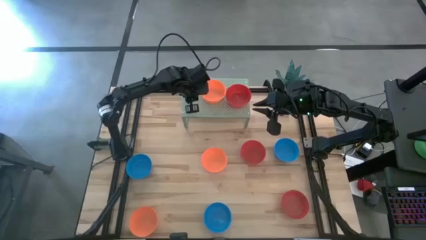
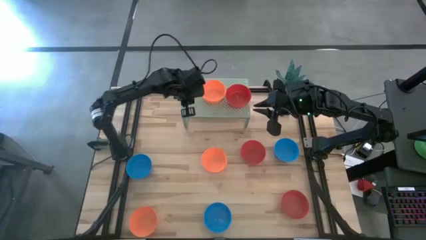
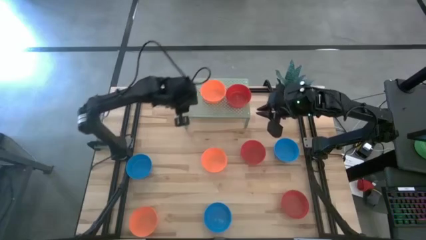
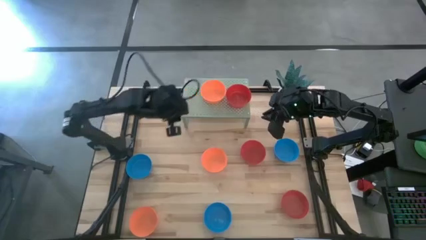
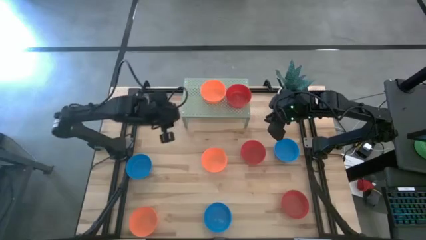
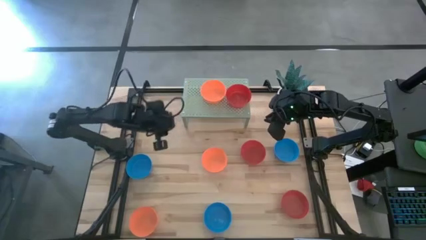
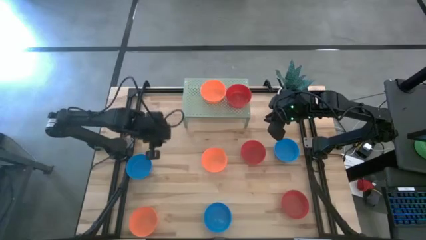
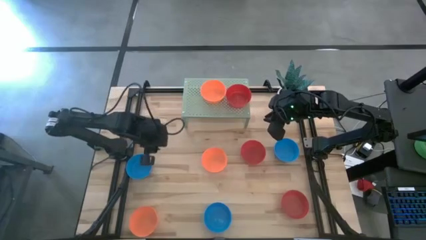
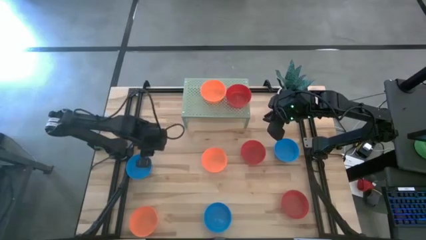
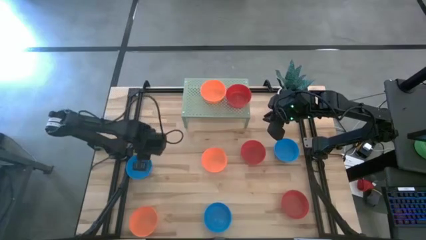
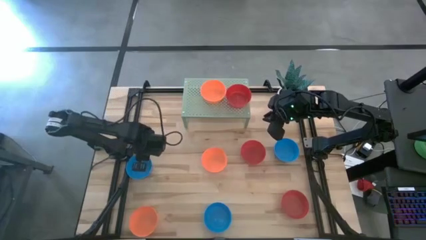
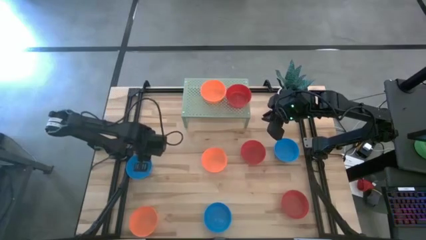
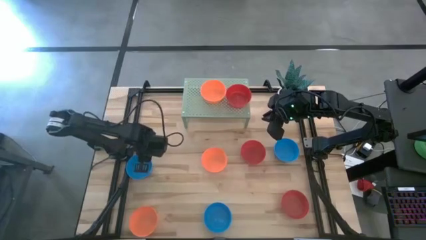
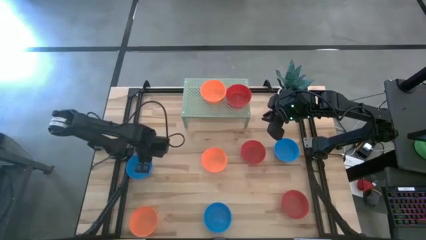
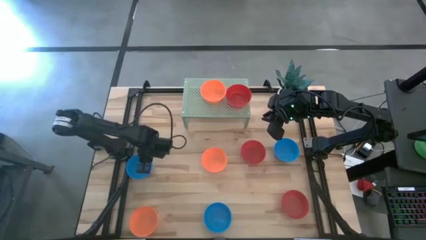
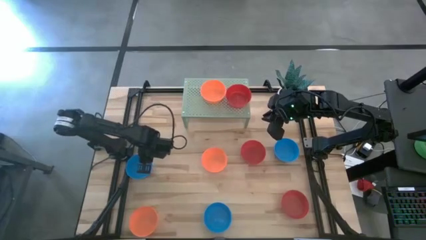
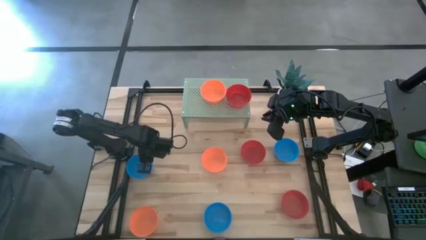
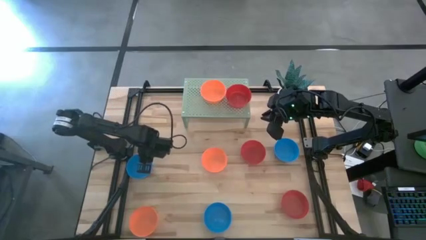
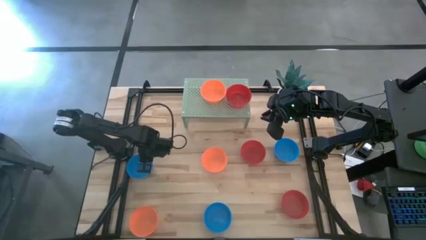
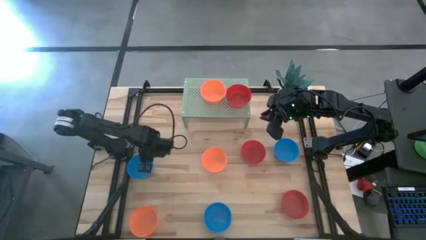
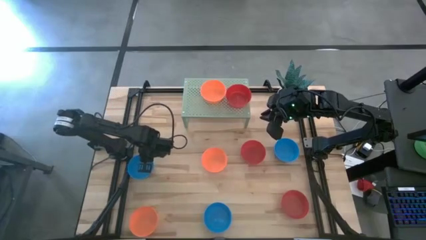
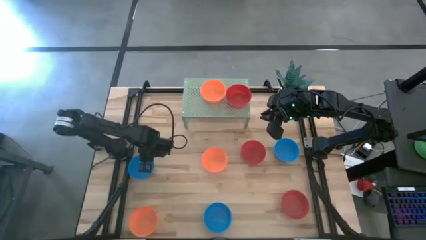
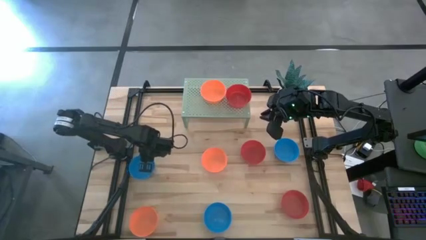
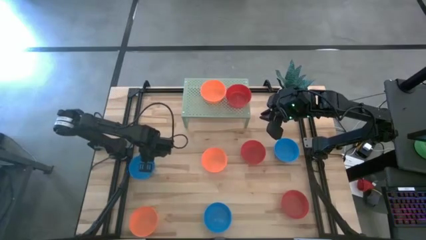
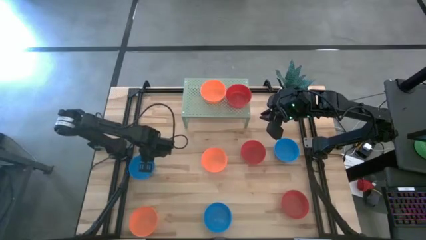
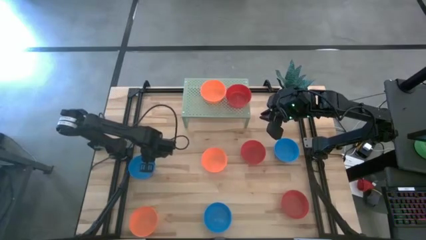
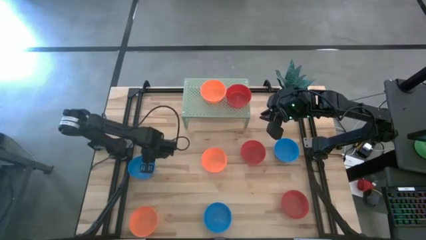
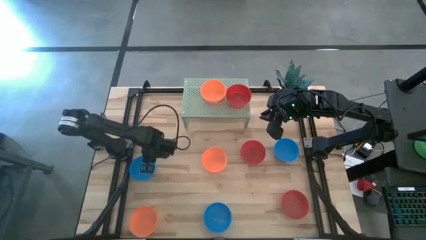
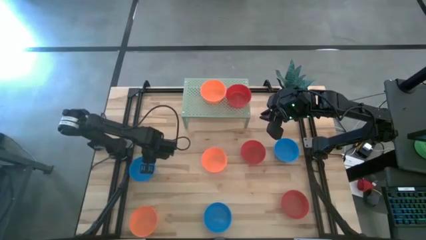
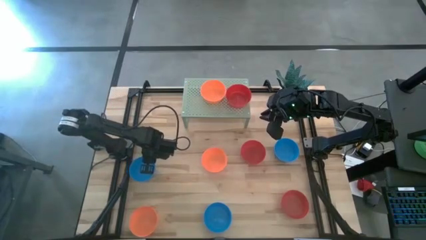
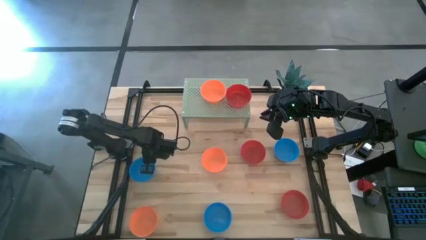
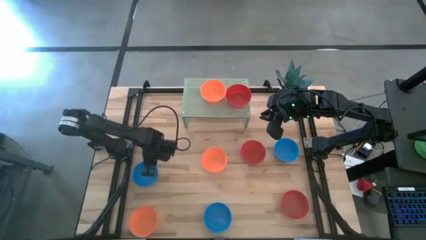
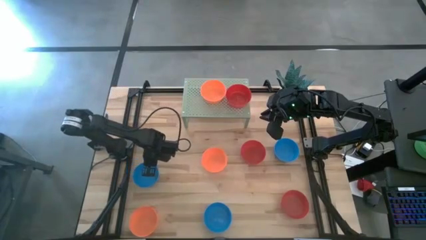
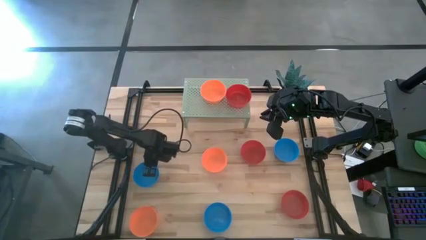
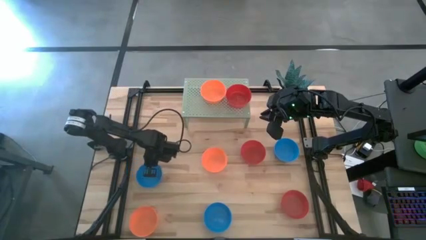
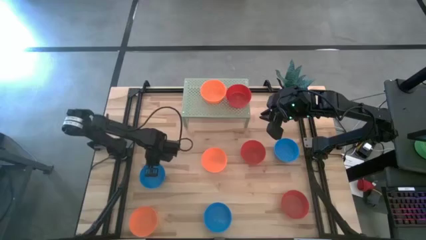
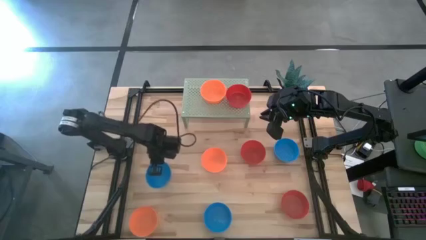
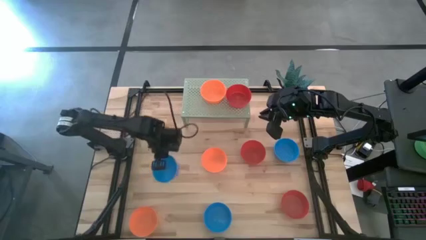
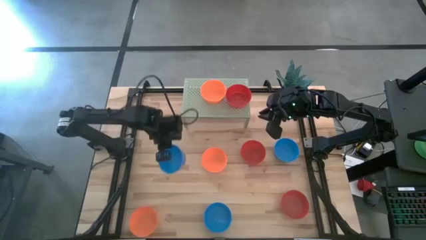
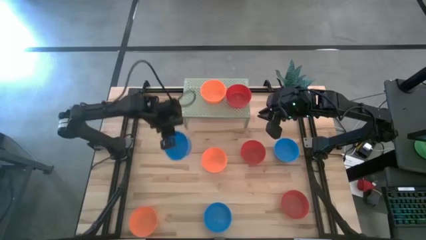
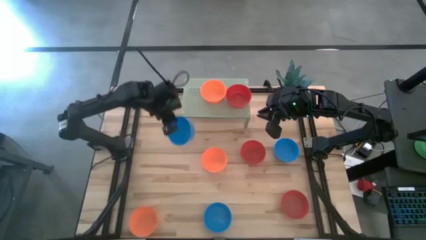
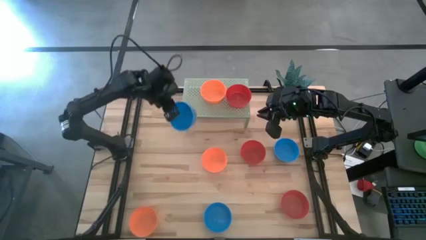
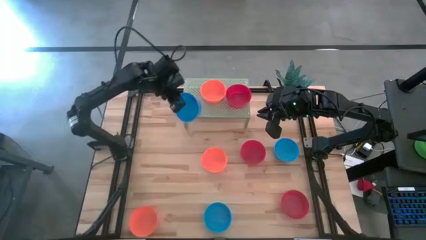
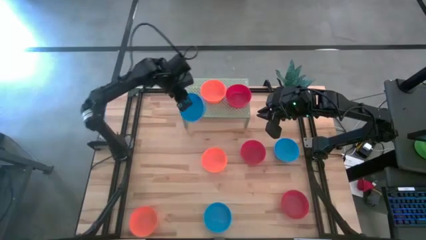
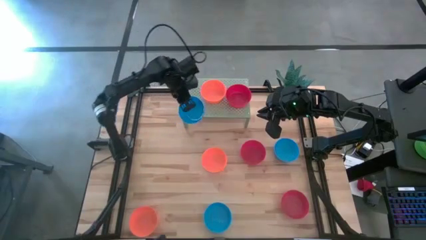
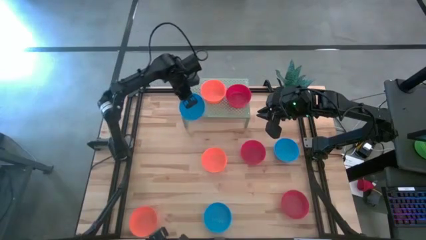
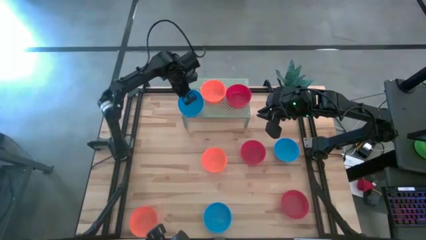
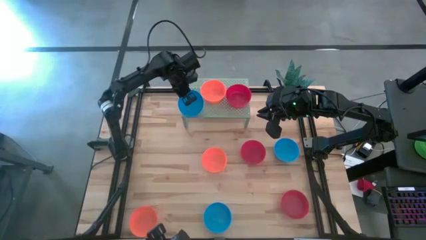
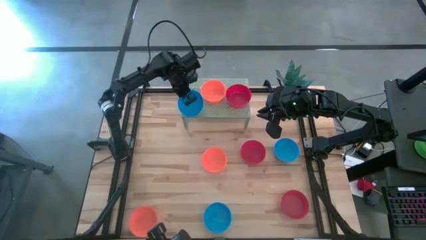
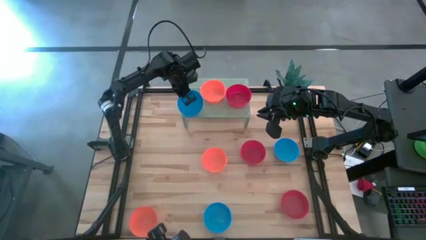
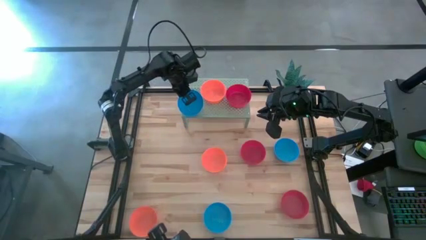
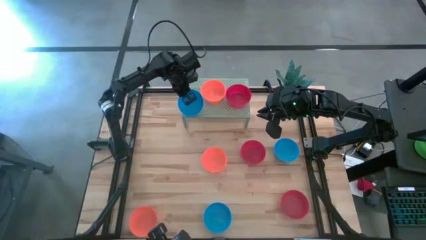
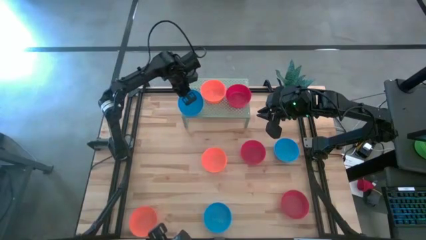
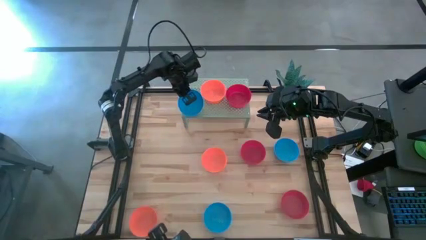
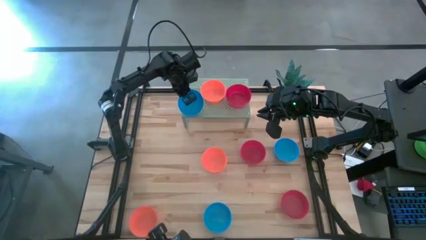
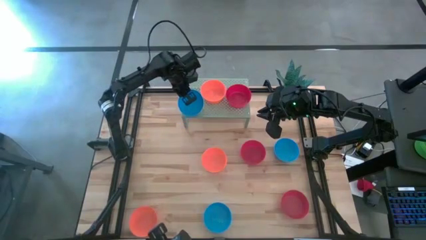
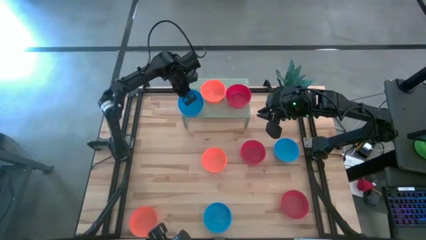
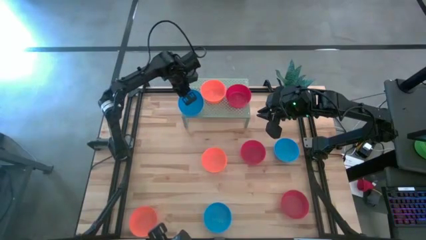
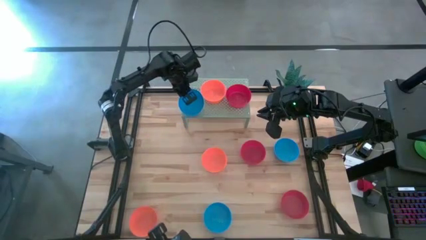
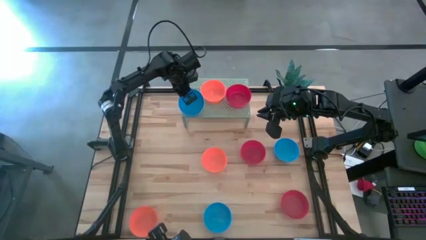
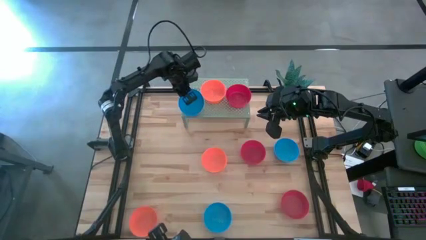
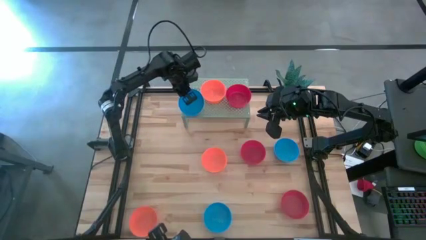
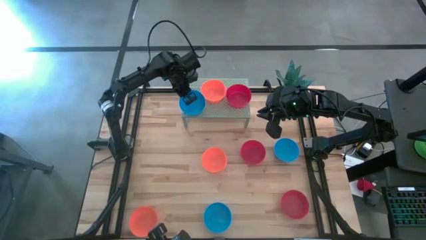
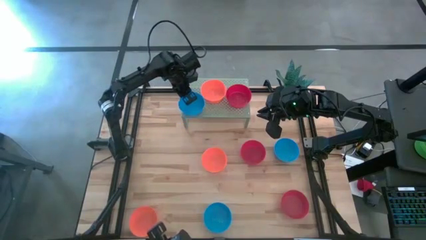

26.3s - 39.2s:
Task: Pick & Place Mini bowls
Put the left blue bowl on the shelf

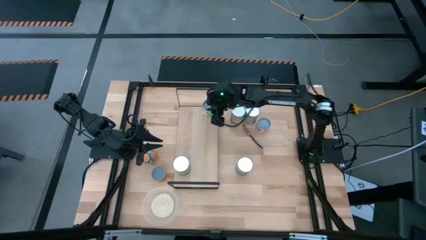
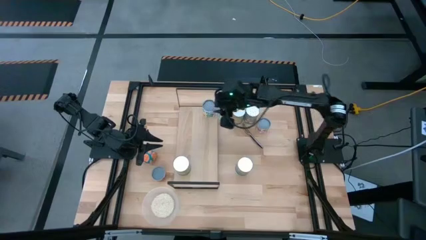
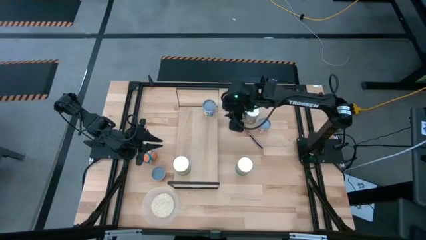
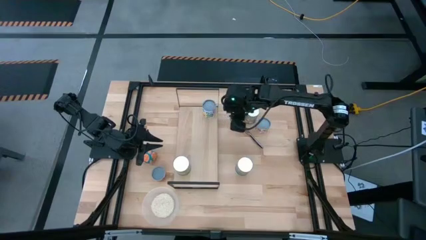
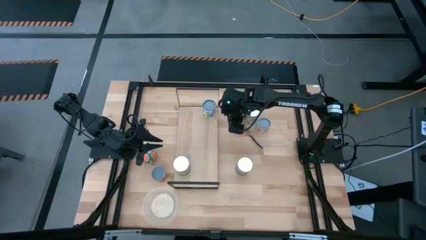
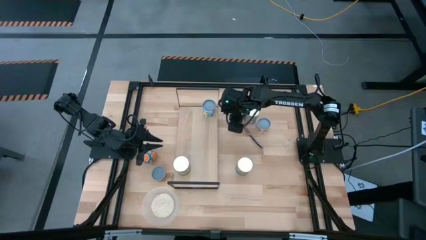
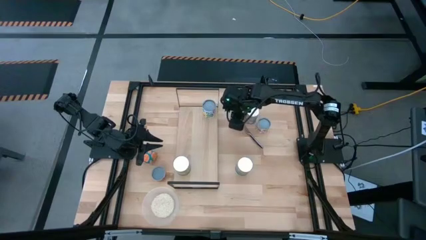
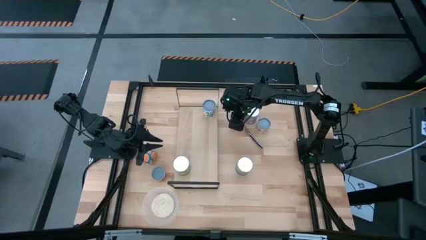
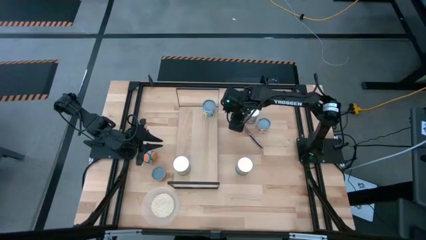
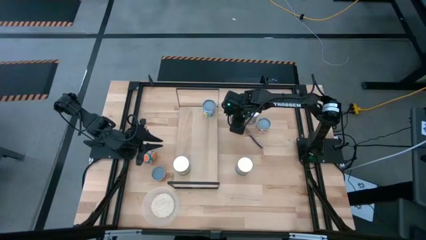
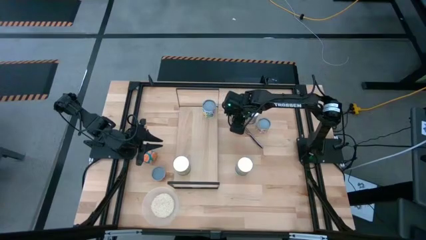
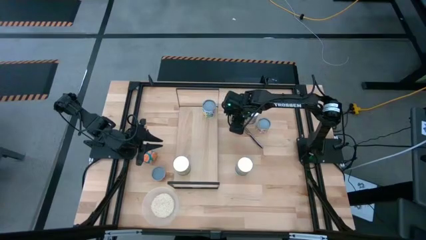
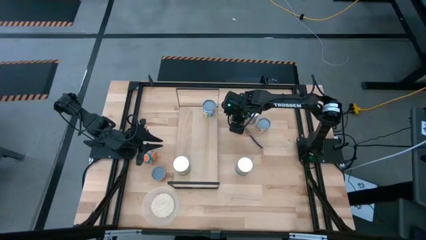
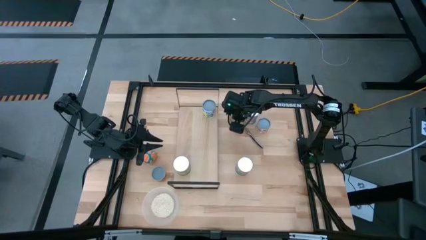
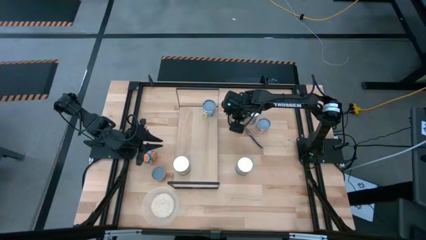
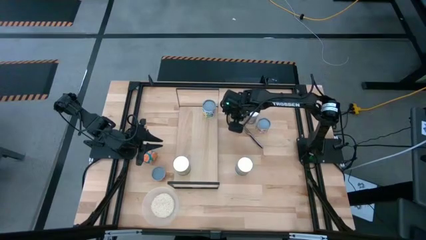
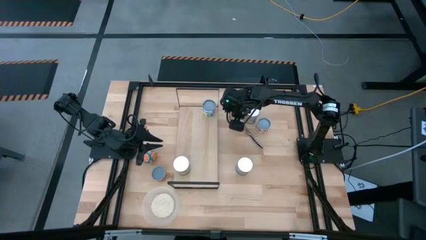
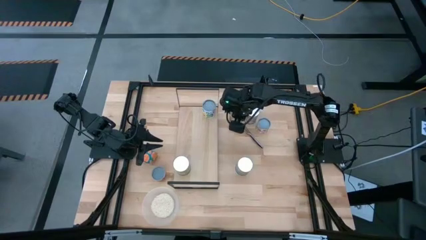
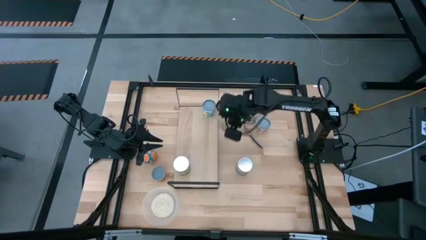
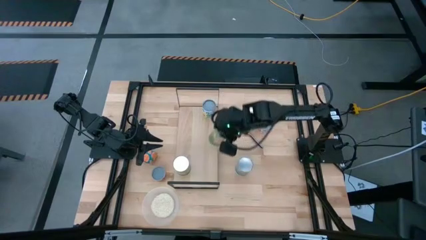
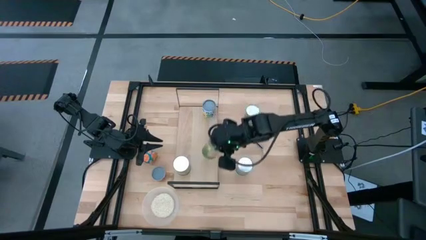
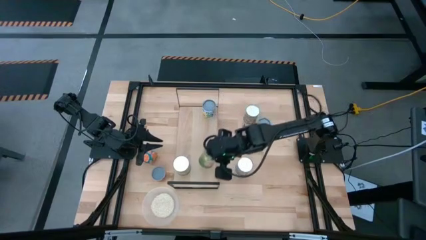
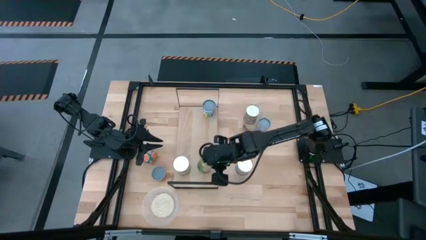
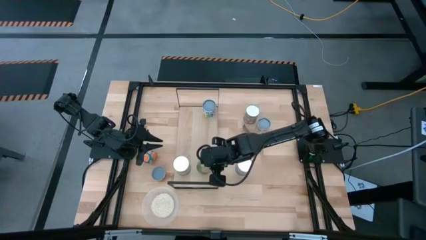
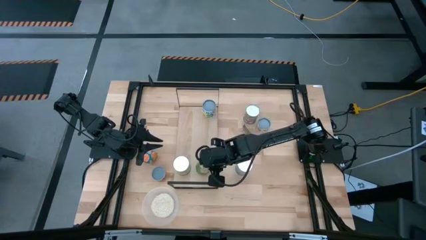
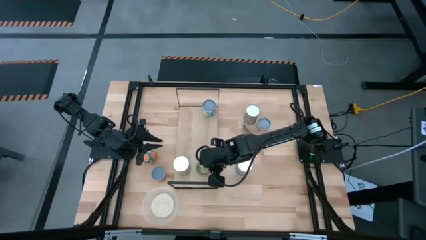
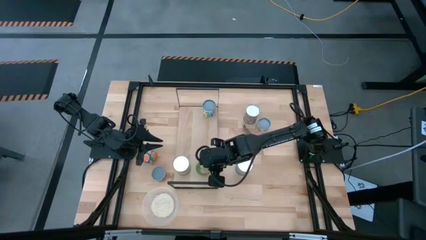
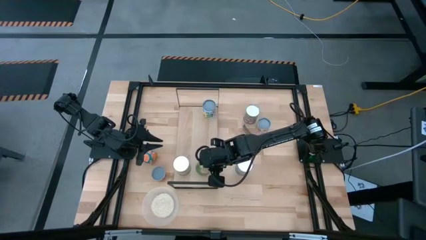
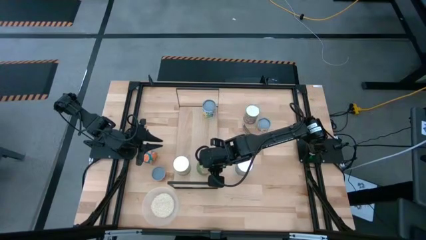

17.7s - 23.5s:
Task: Pick and place cans onto a shelf
Put the large canned oranges on the shelf
